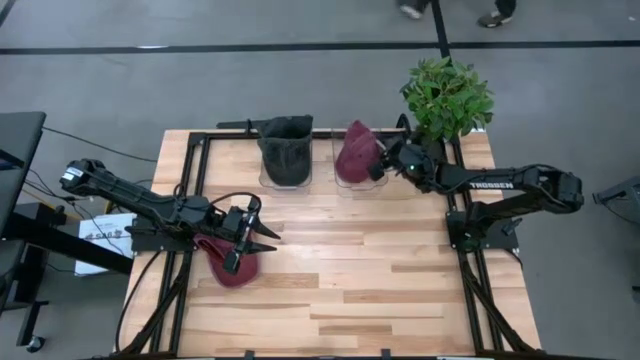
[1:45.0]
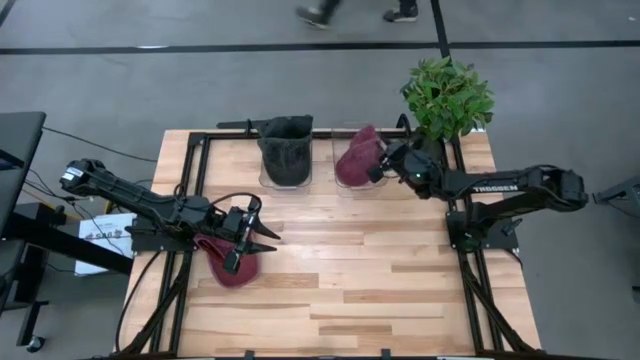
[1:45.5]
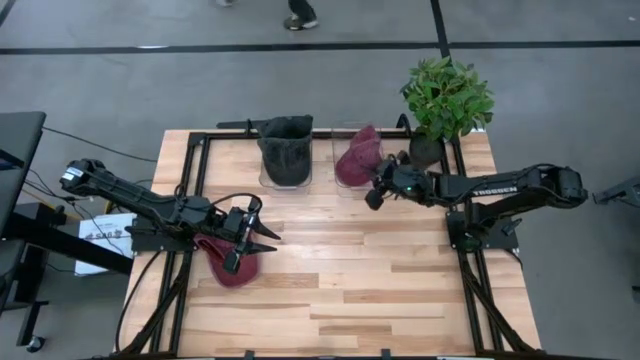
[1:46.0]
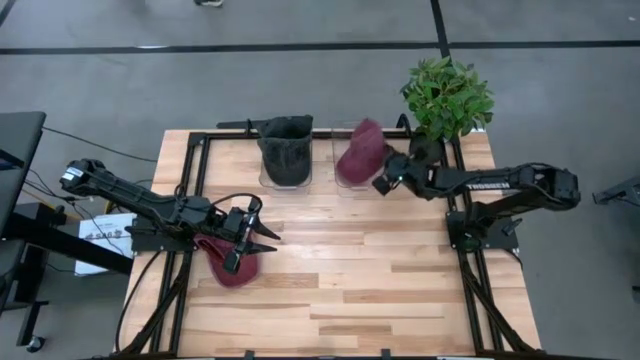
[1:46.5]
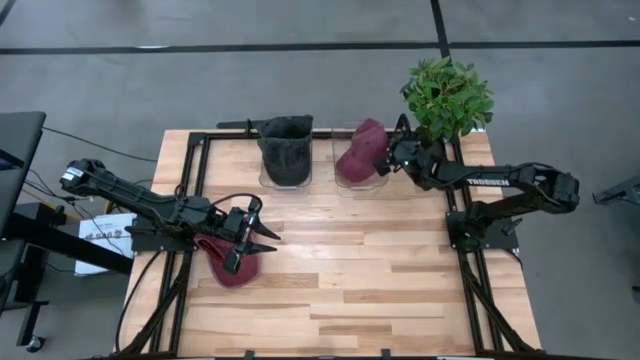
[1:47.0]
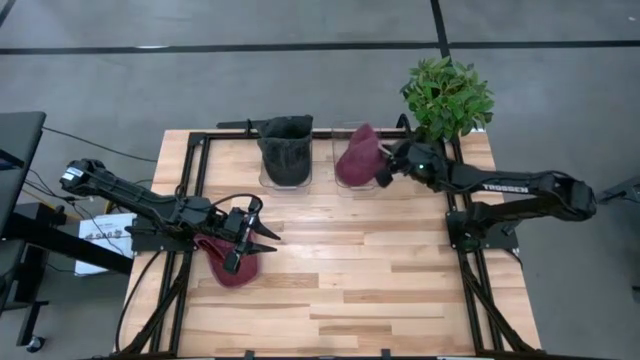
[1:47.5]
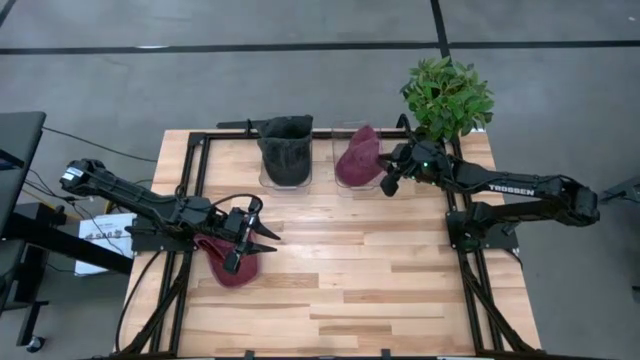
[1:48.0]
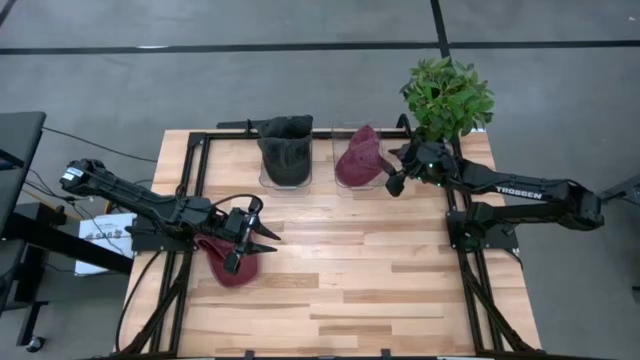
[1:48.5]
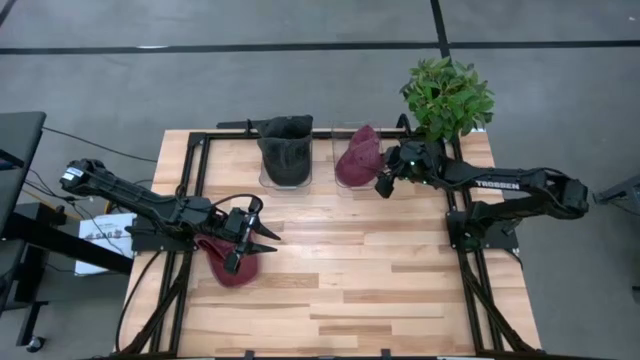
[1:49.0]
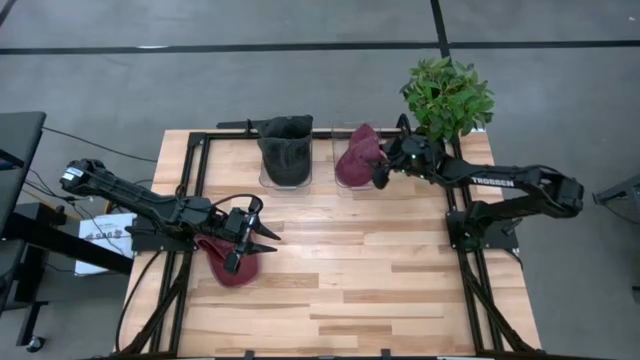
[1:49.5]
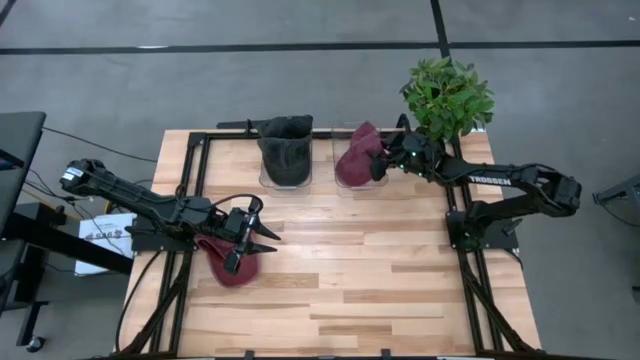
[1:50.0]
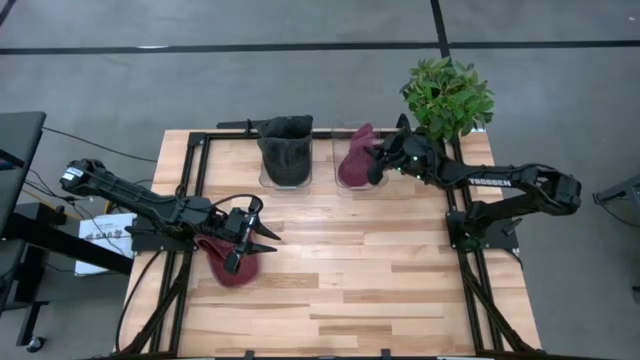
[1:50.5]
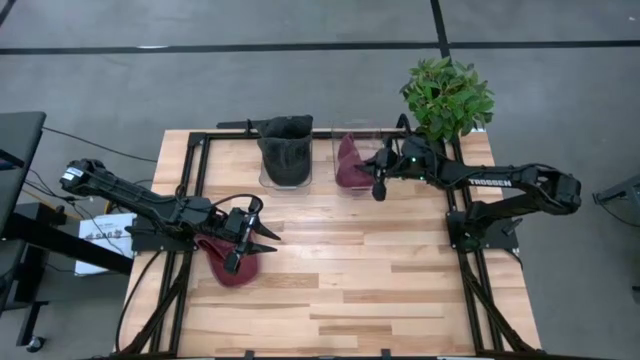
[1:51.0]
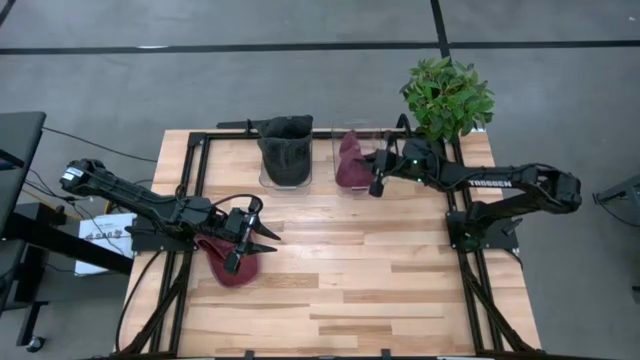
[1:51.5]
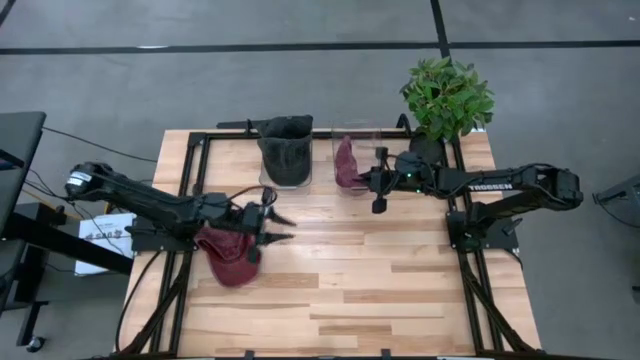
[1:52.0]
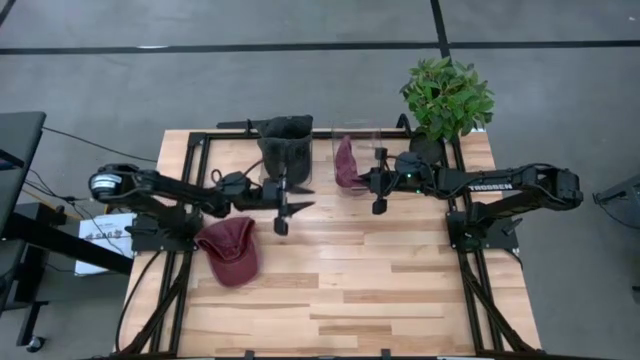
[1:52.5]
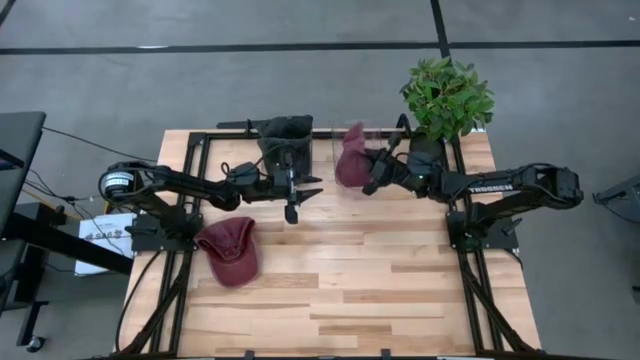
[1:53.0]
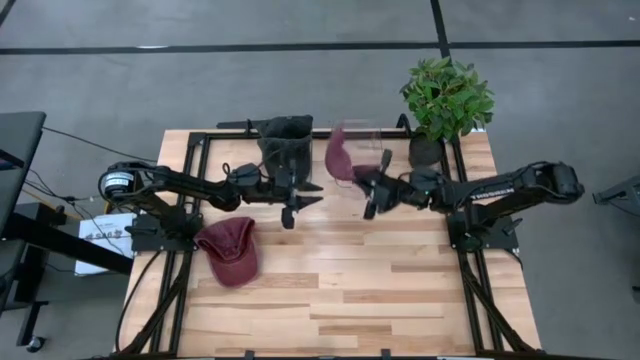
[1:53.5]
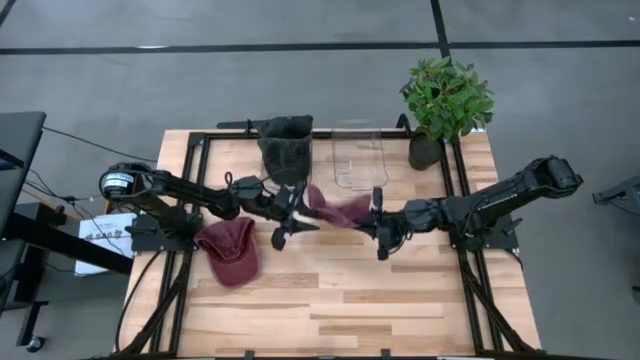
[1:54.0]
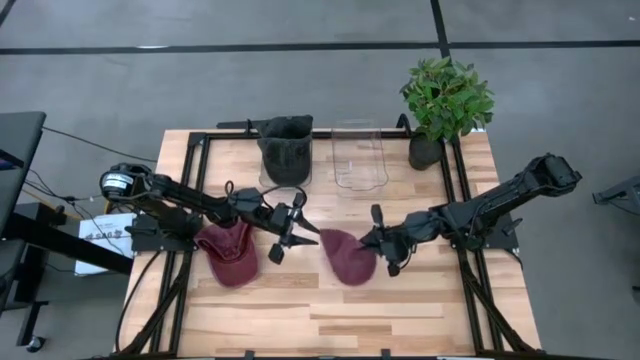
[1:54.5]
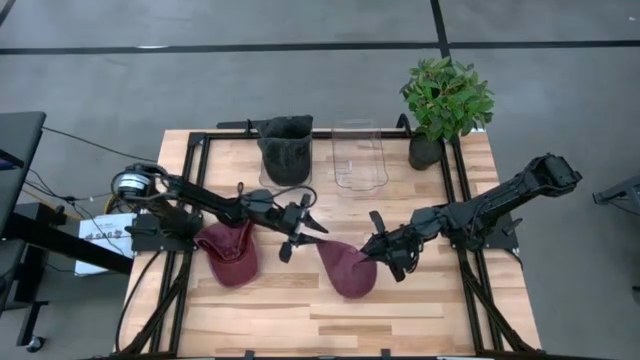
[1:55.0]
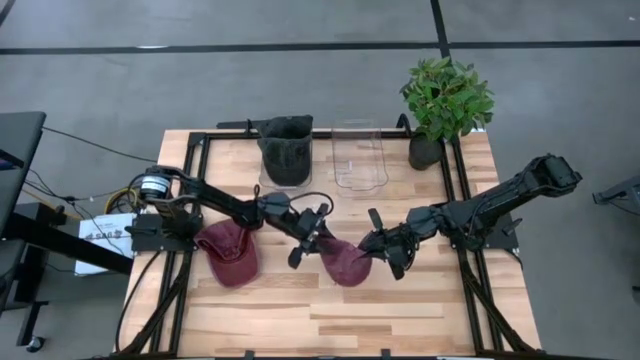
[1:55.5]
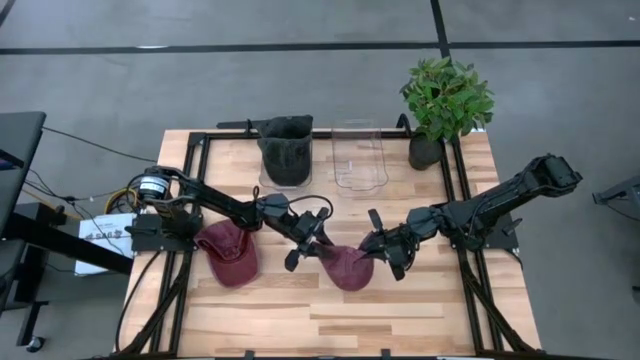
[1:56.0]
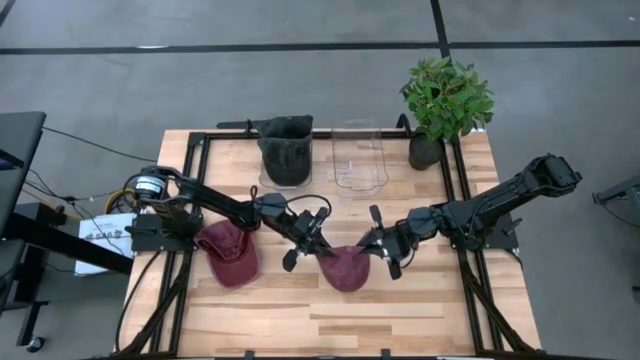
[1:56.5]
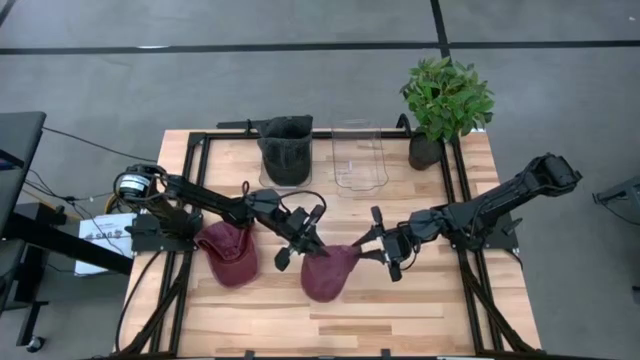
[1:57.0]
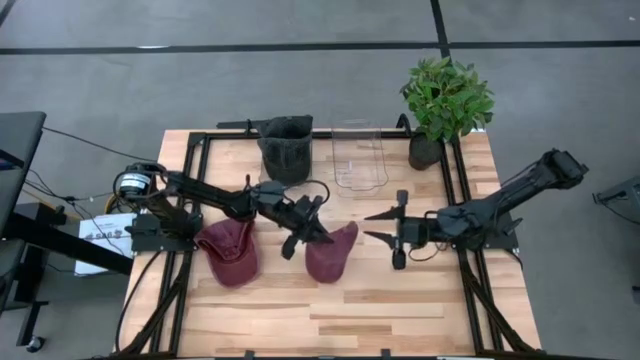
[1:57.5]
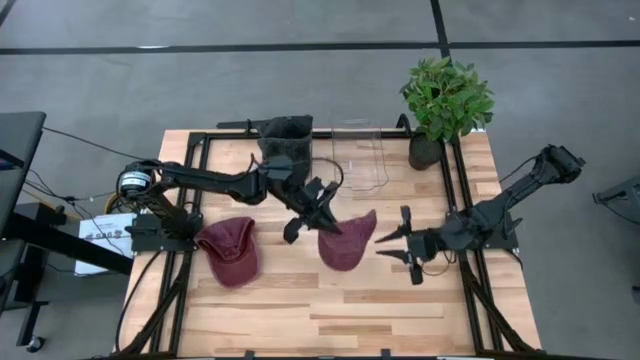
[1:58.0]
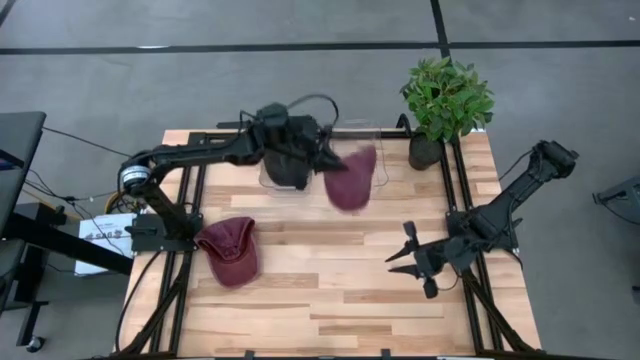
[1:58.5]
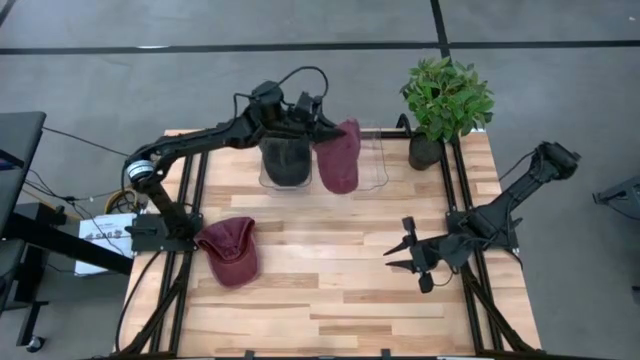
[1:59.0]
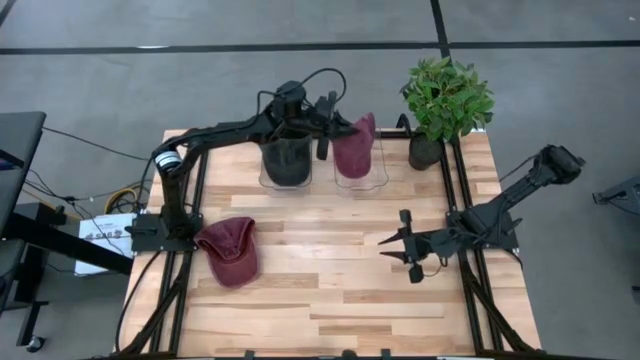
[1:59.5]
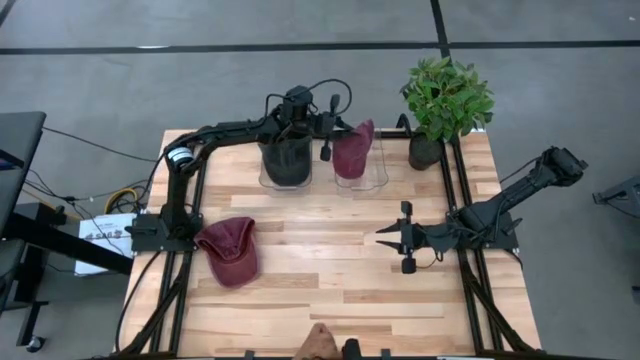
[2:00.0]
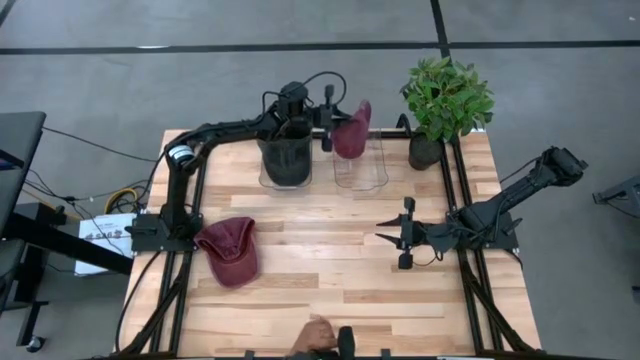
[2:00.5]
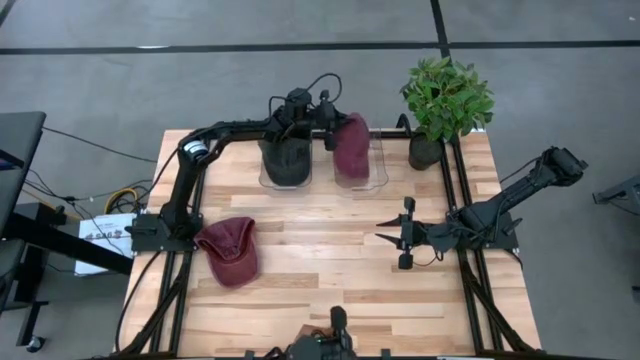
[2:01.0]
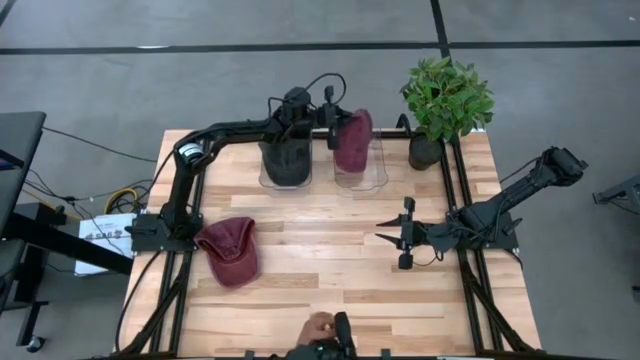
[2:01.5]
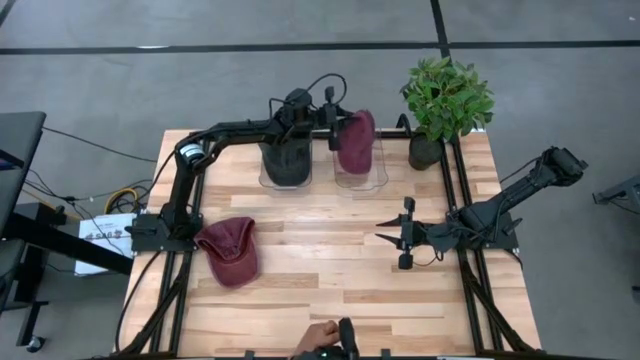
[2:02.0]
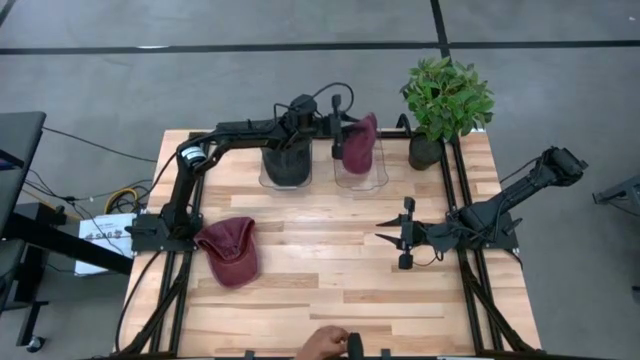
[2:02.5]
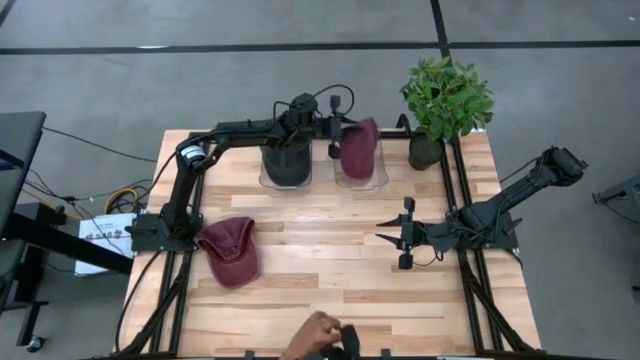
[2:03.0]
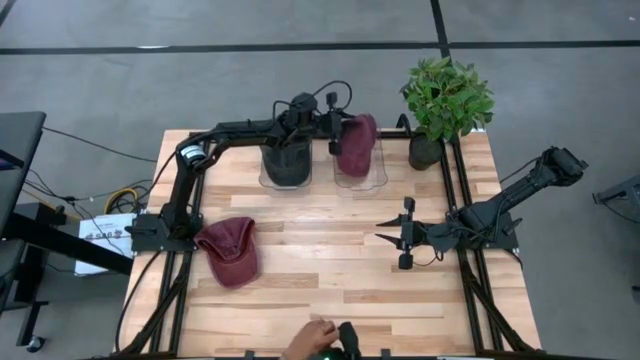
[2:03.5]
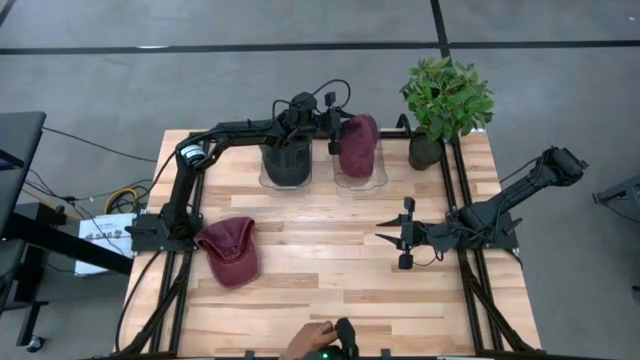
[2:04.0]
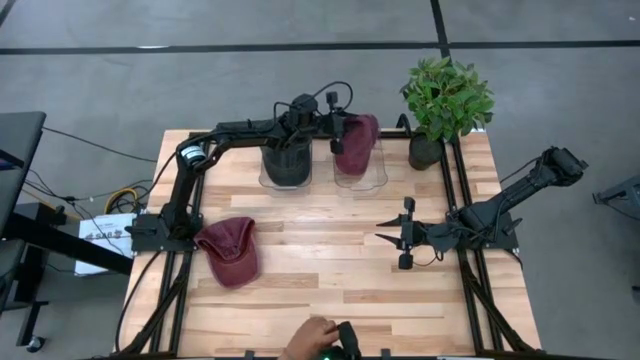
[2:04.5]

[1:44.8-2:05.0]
Task: Pick & Place hat
Put the right red cap into the right transparent bin

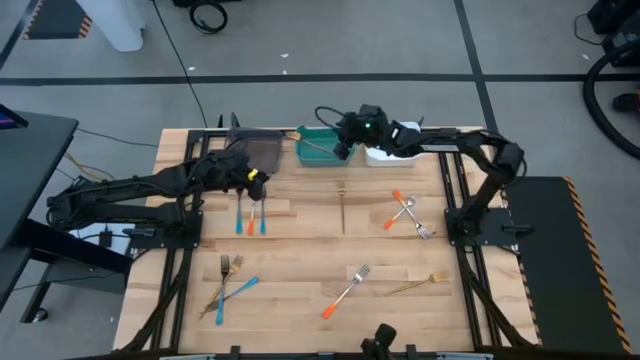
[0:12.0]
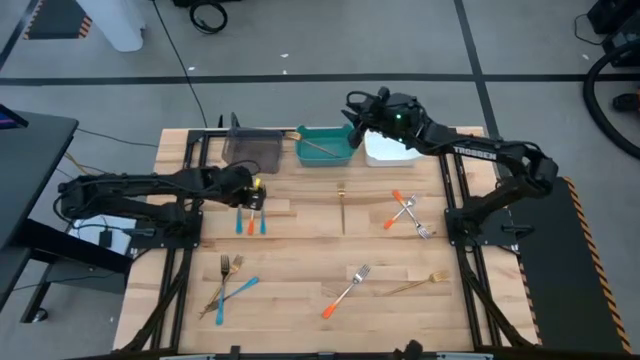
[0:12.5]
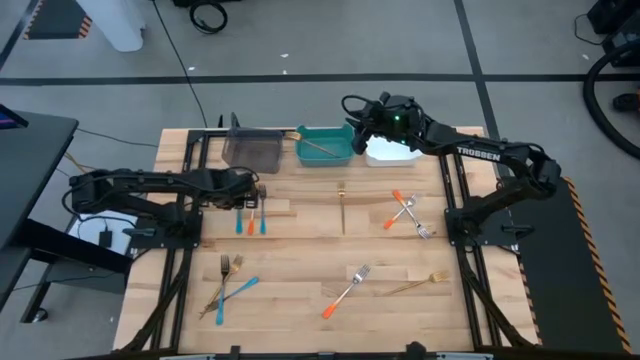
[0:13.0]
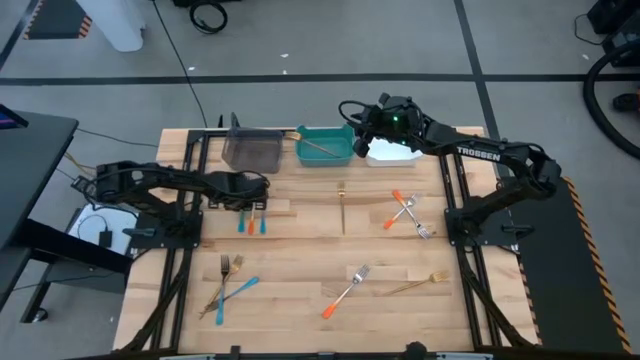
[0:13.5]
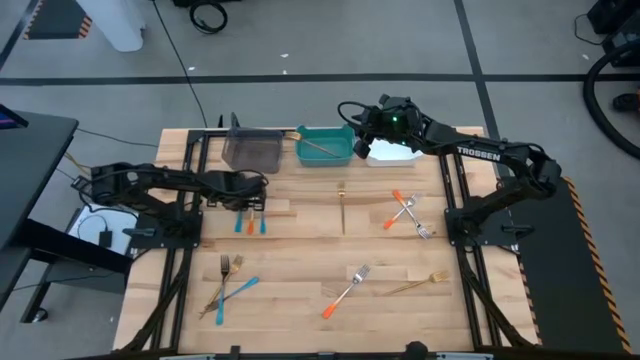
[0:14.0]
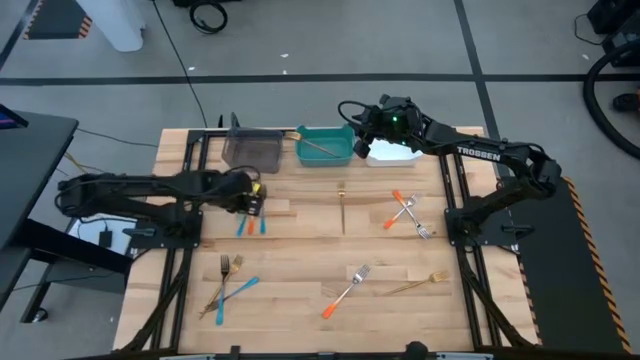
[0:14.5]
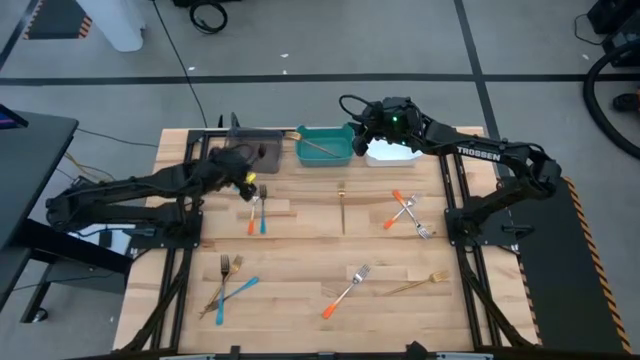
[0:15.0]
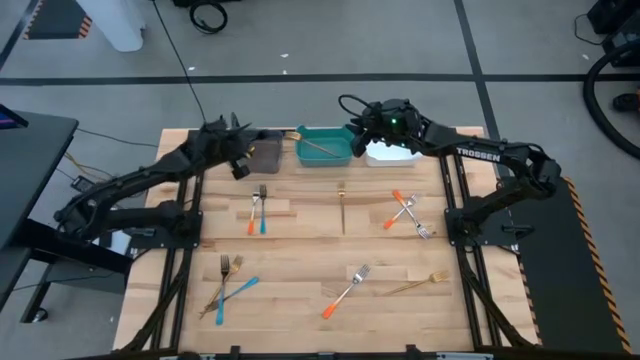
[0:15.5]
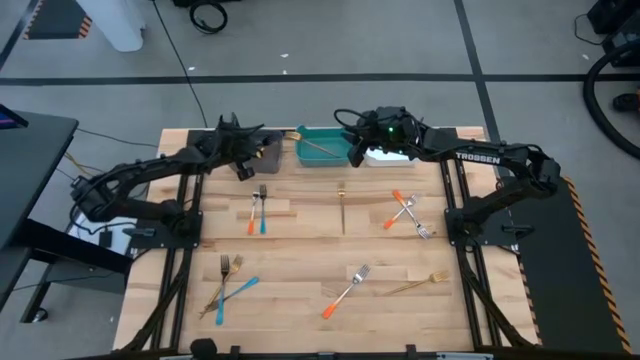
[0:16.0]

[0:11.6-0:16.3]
Task: Sort silverware by color (type)
Put the blue fork into the black transparent bin
